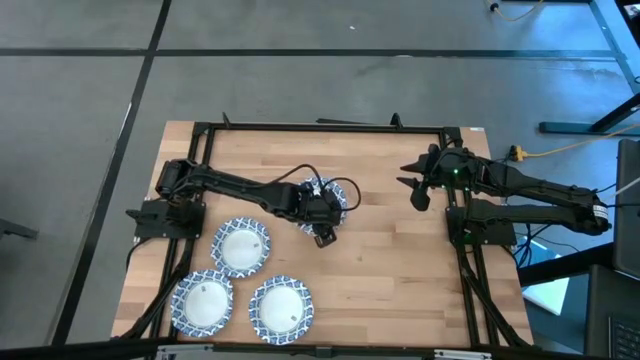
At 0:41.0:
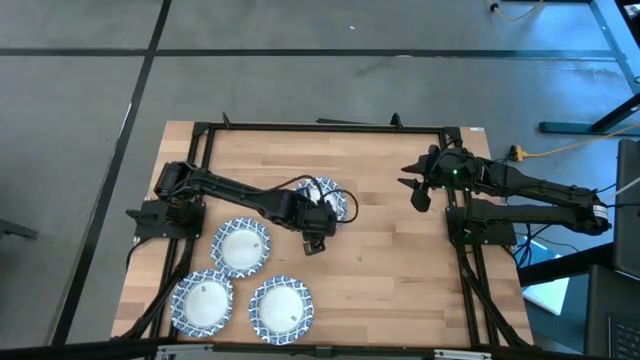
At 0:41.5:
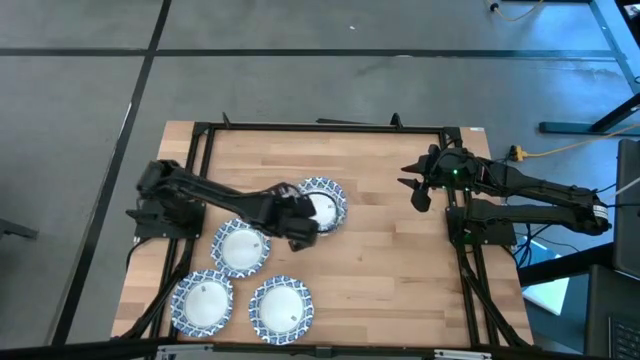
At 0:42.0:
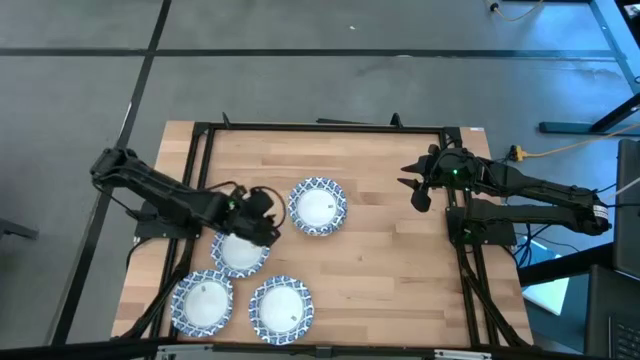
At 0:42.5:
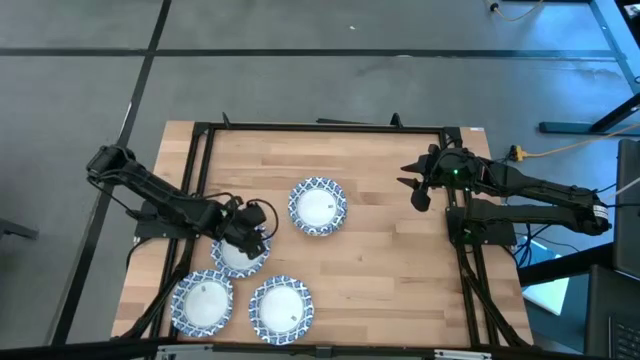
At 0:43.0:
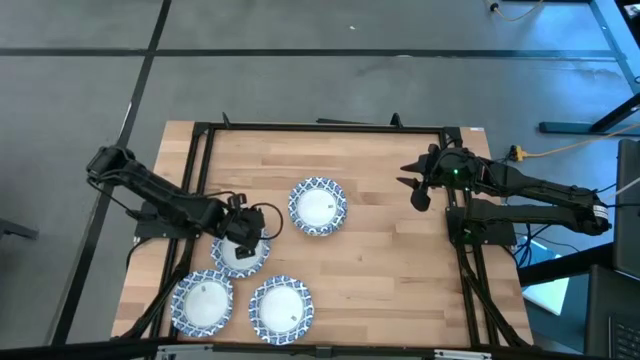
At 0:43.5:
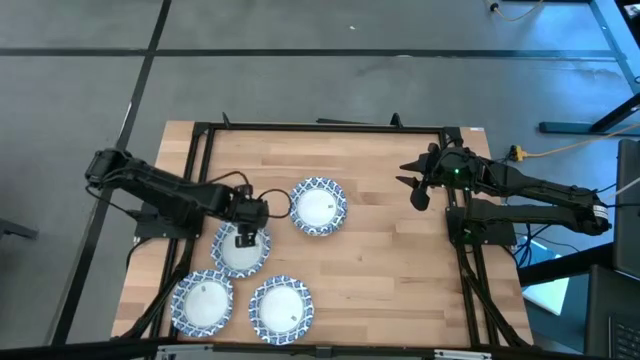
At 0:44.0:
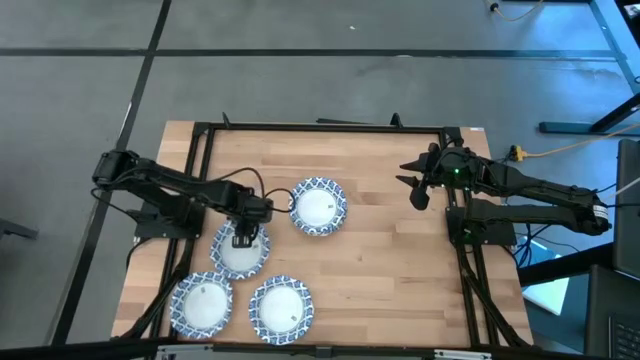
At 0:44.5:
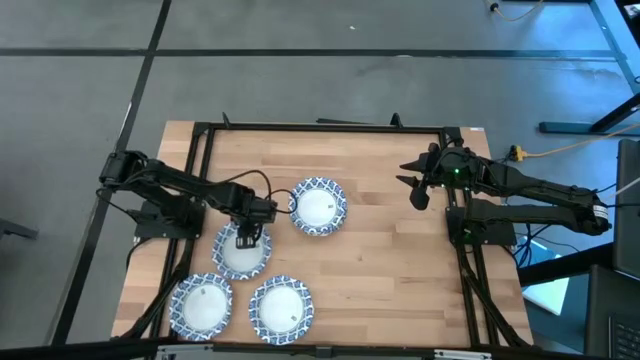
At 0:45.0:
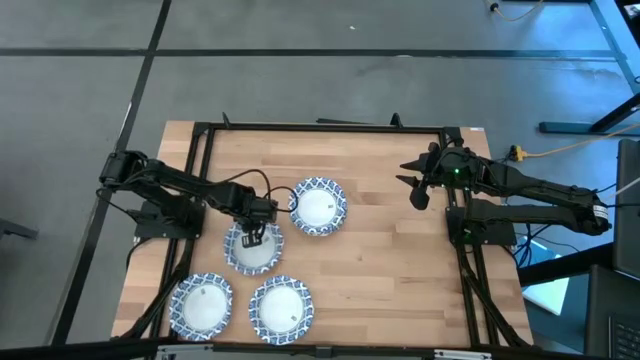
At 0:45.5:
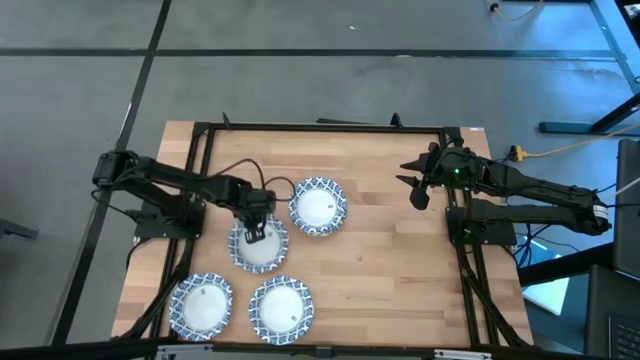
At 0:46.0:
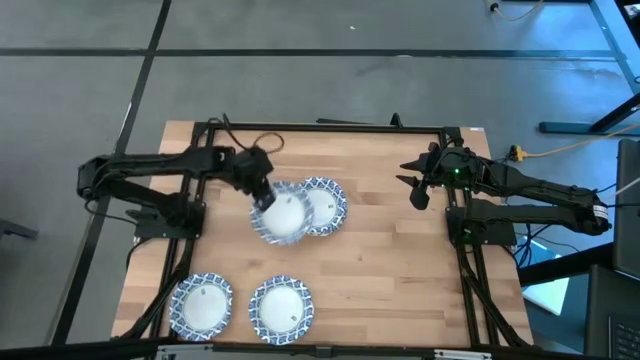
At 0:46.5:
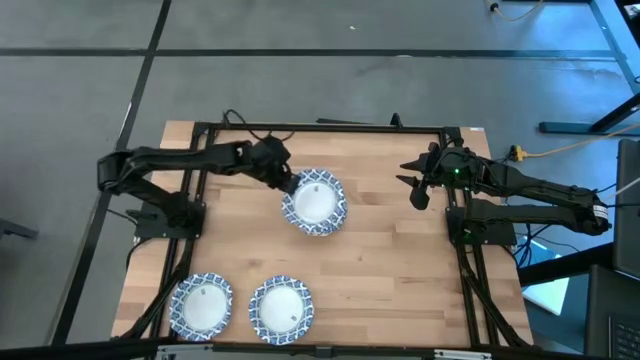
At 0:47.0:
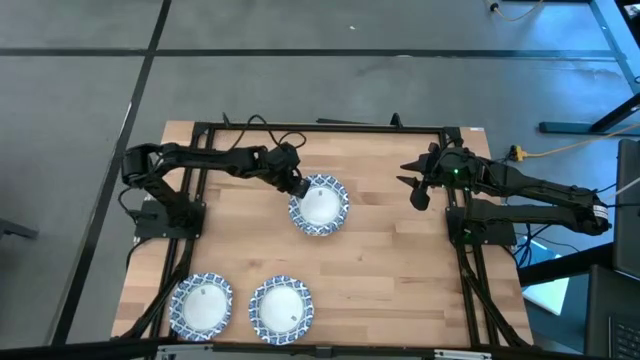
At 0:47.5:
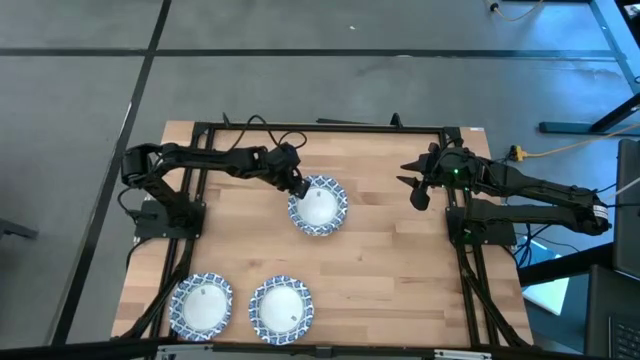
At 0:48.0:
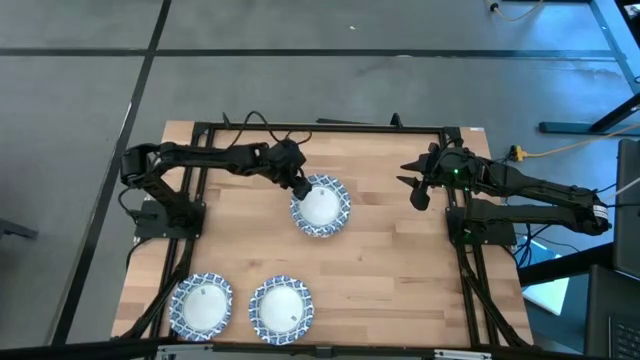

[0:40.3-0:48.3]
Task: Nest bowls inside each other
Stack the white bowl on top of the other white bowls

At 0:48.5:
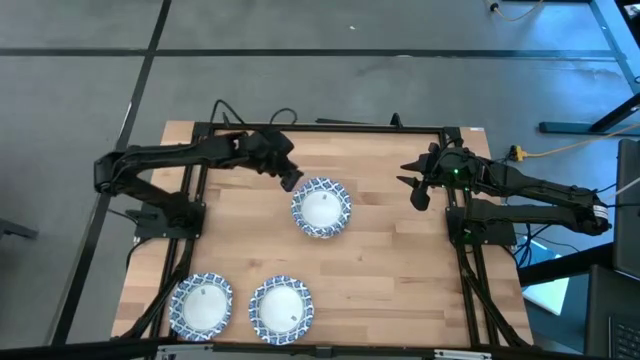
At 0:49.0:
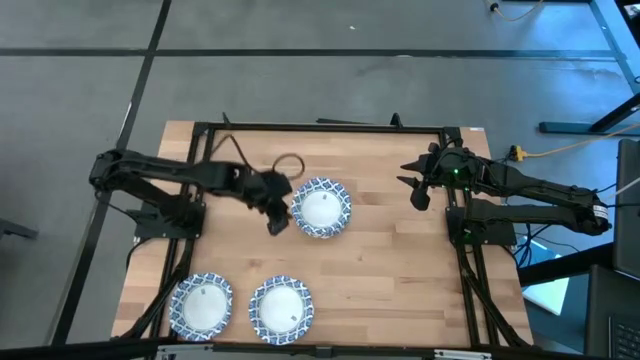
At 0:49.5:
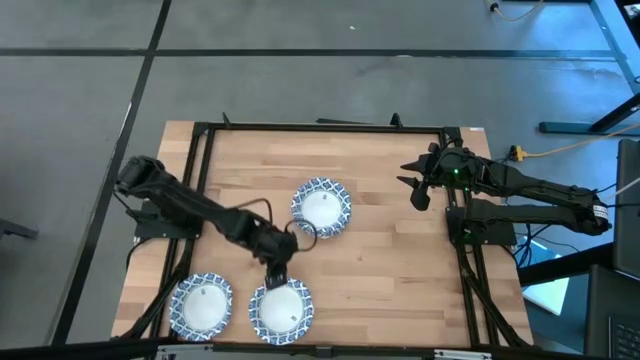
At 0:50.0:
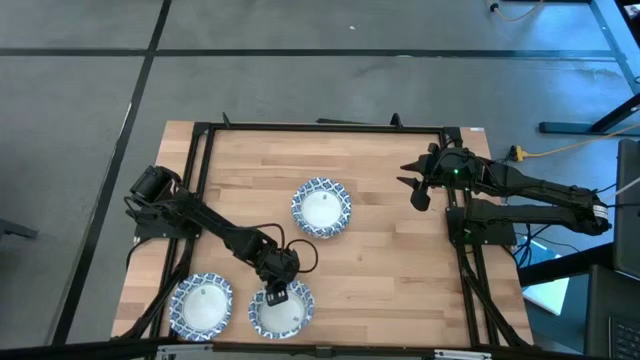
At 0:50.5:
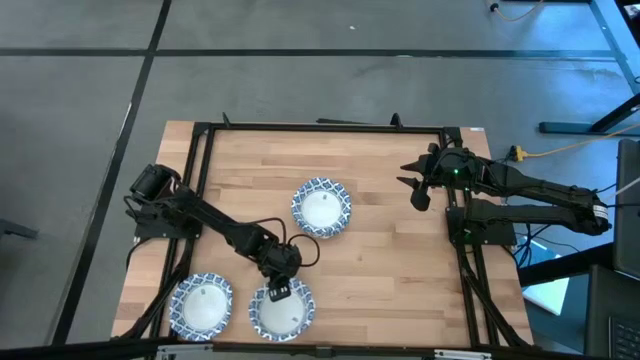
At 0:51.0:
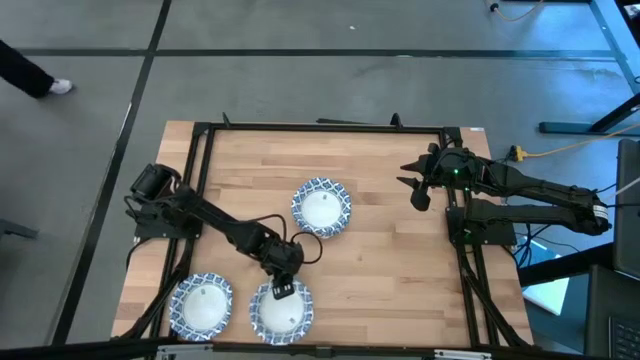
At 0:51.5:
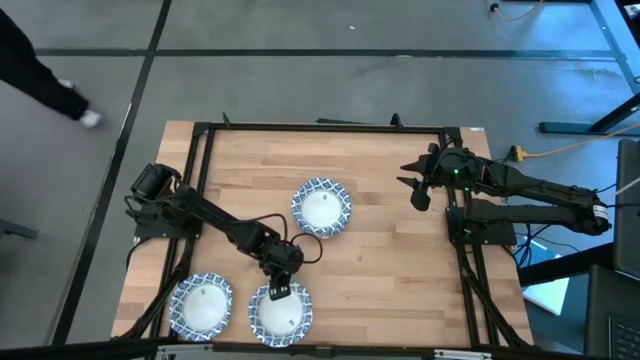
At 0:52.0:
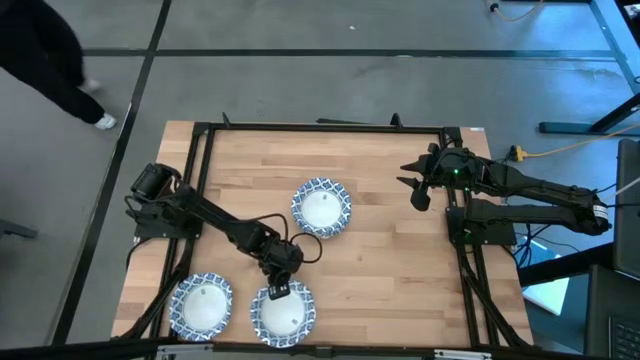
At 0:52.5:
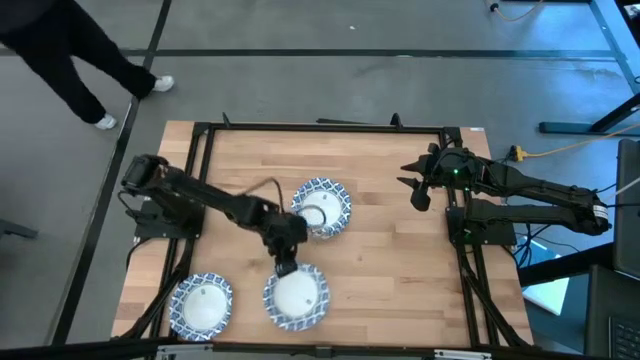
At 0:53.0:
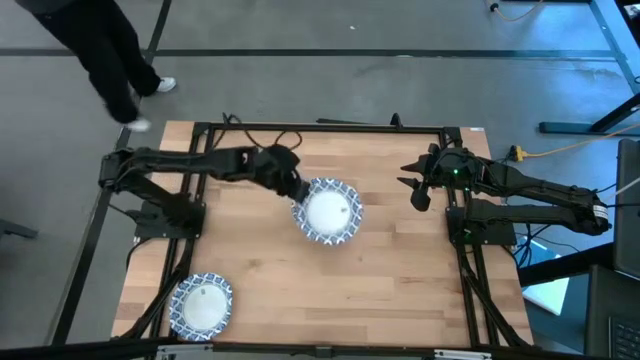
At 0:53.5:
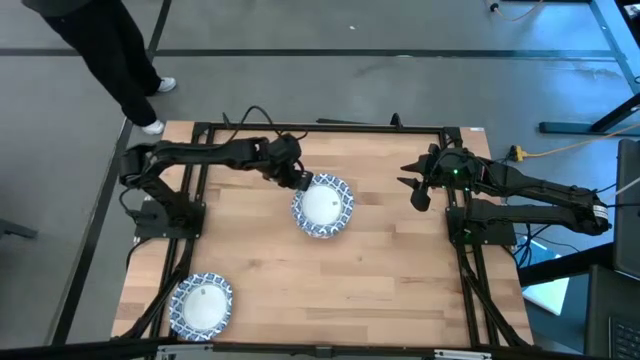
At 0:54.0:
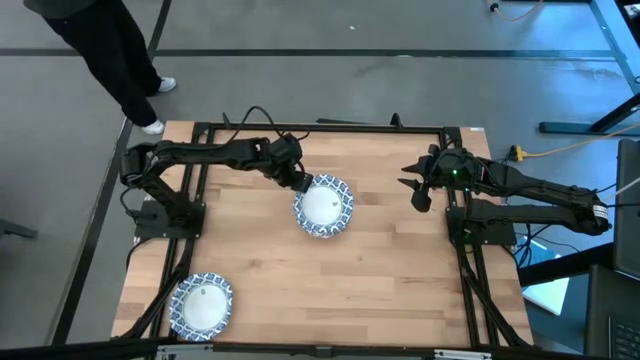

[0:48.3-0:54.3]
Stack the white bowl on top of the other white bowls

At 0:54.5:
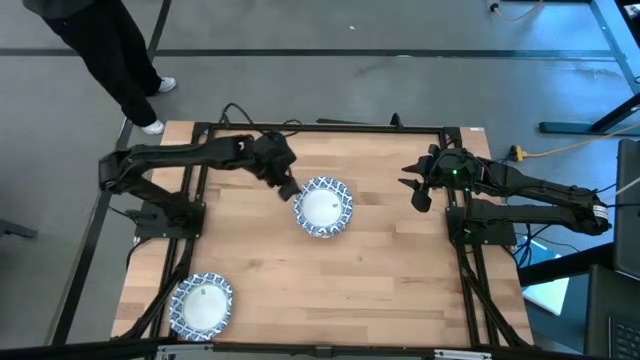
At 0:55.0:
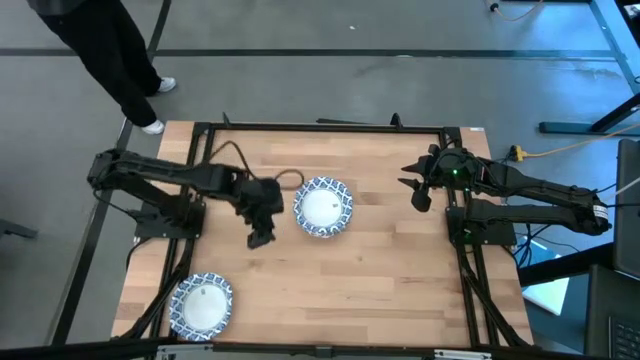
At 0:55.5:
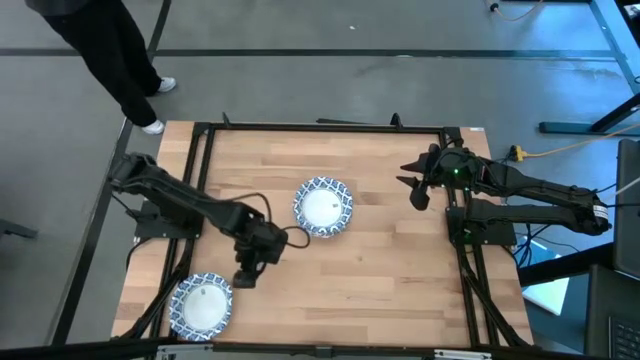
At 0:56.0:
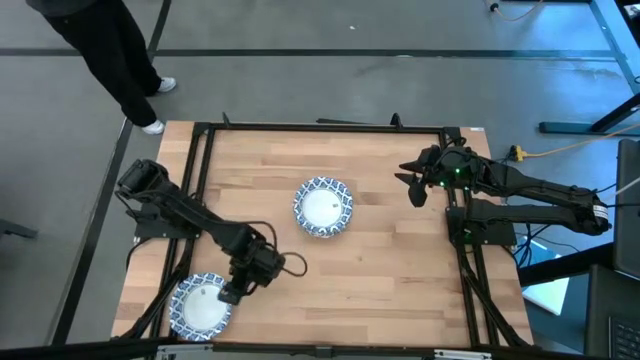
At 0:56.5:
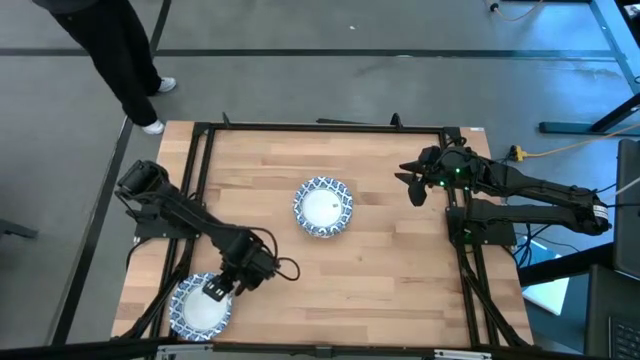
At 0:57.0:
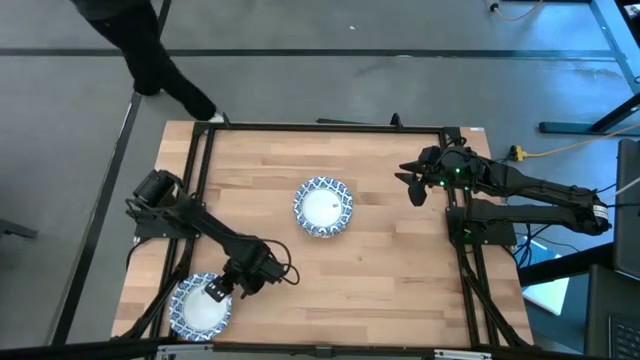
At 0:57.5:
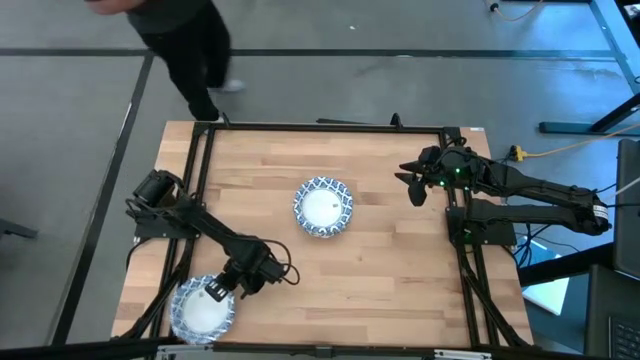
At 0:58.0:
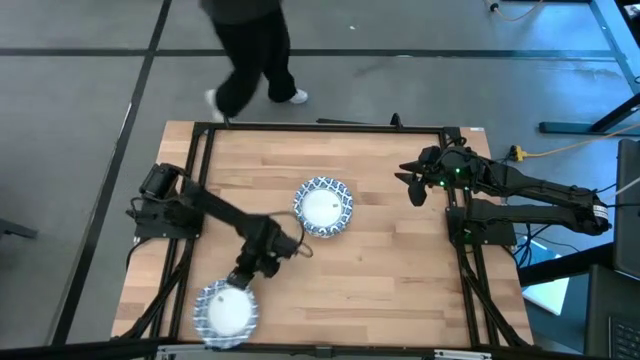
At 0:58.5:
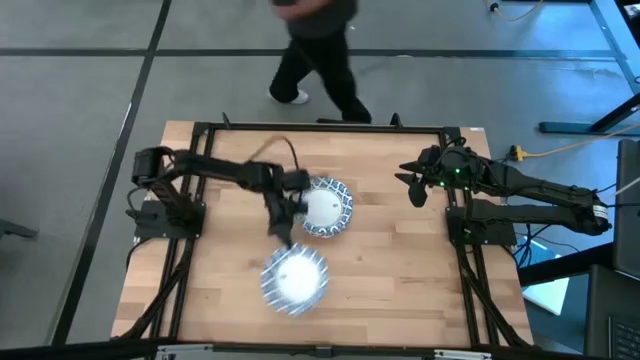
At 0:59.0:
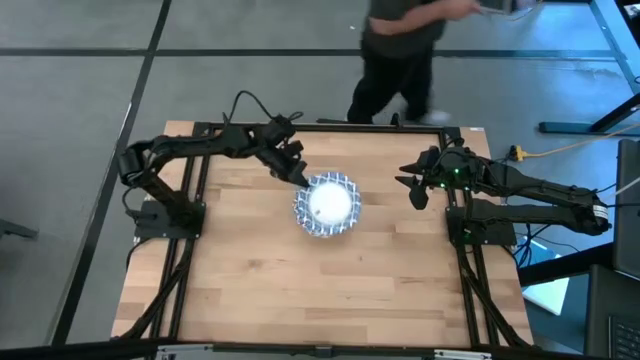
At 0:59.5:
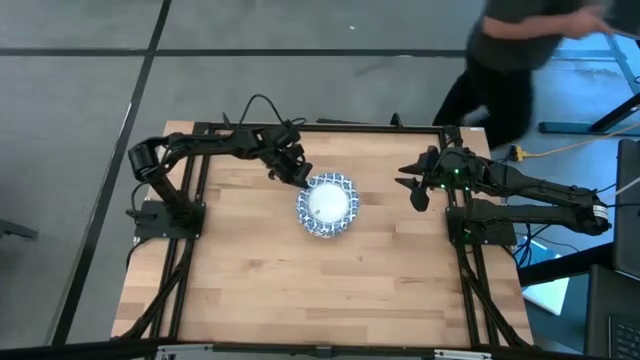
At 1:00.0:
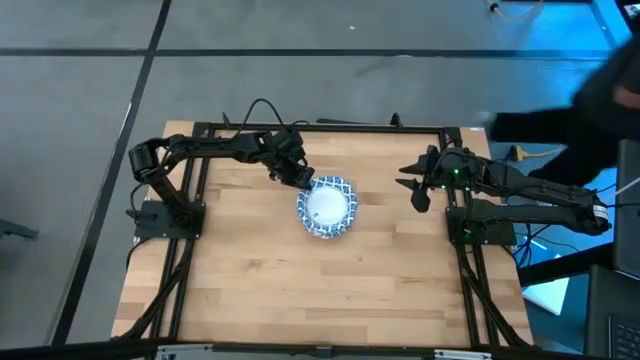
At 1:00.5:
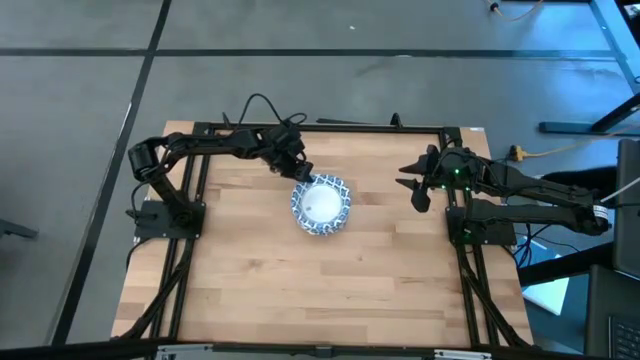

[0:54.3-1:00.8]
Stack the white bowl on top of the other white bowls
